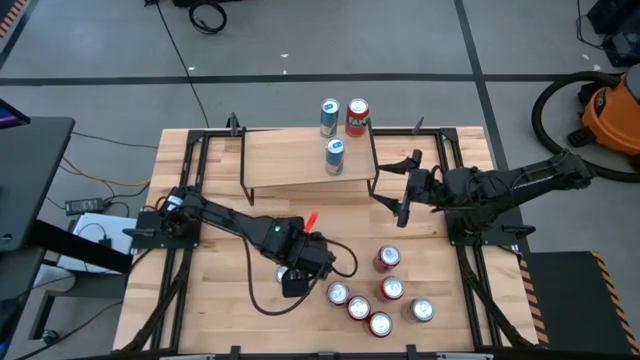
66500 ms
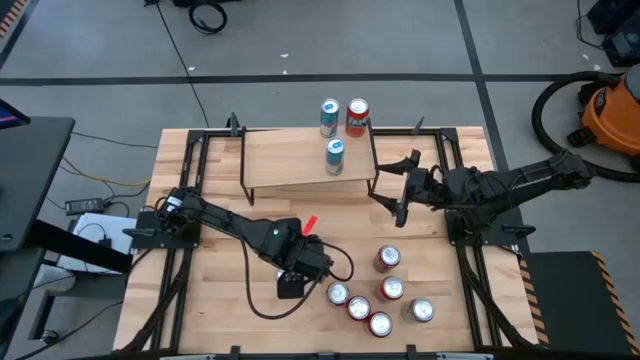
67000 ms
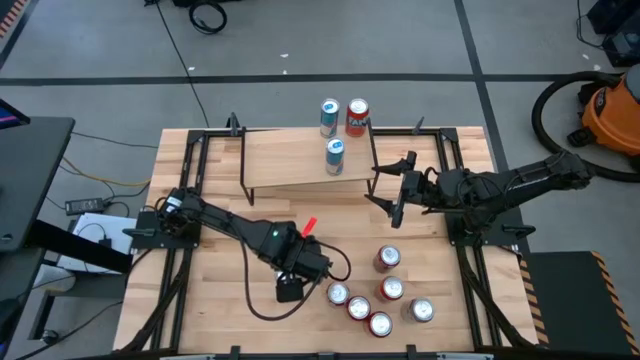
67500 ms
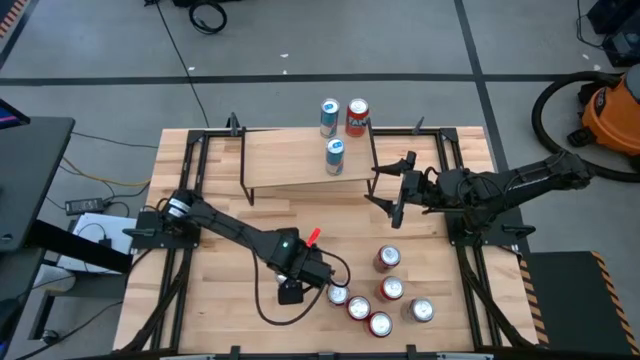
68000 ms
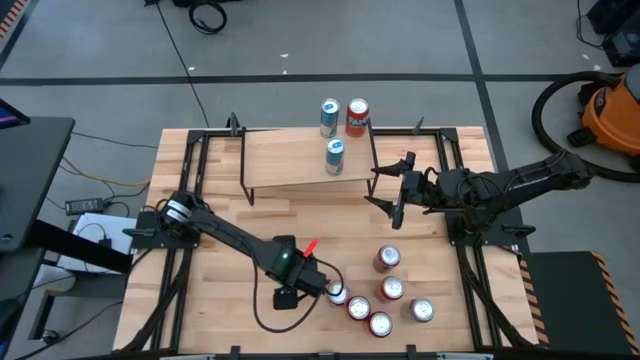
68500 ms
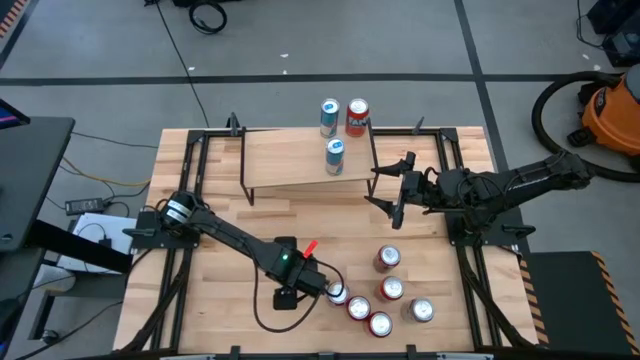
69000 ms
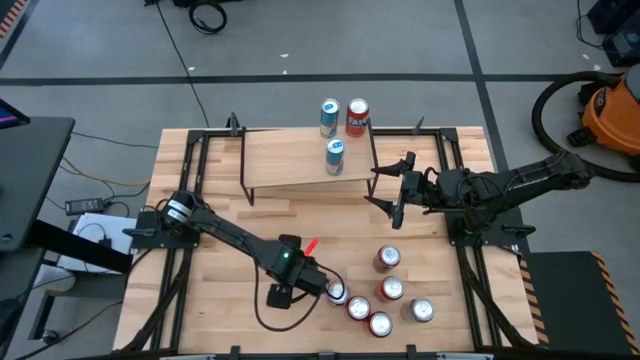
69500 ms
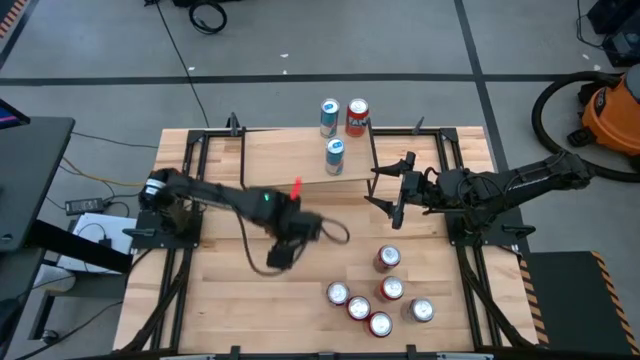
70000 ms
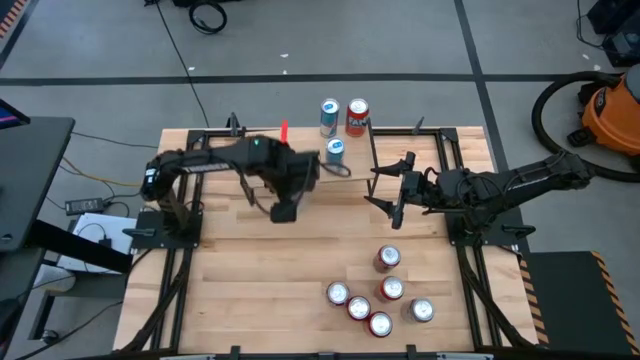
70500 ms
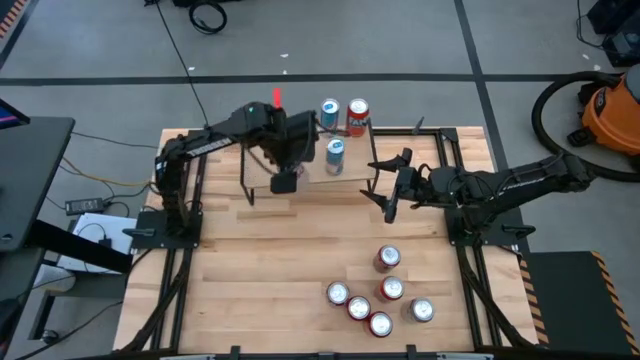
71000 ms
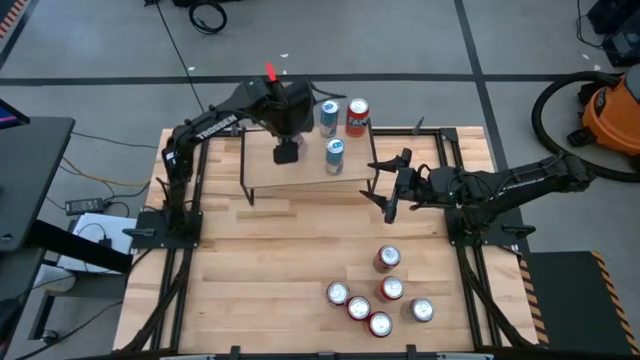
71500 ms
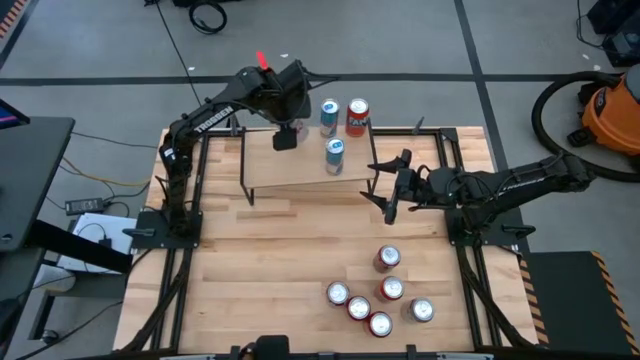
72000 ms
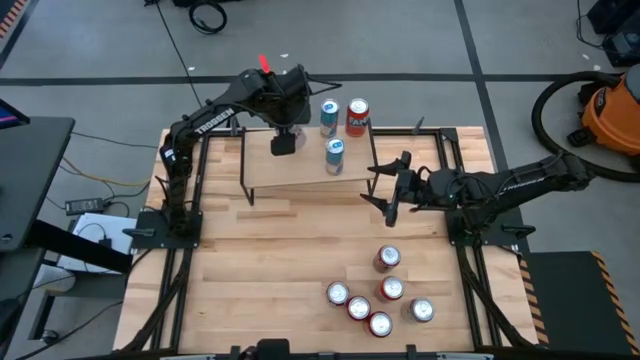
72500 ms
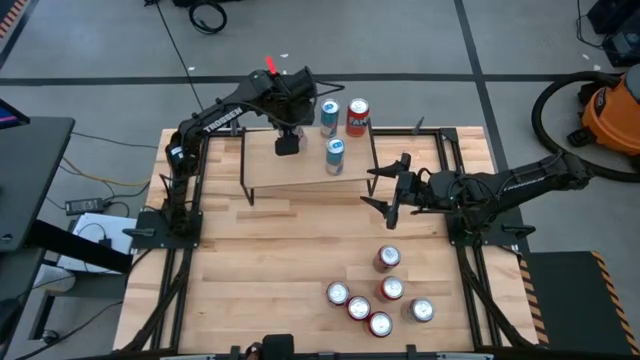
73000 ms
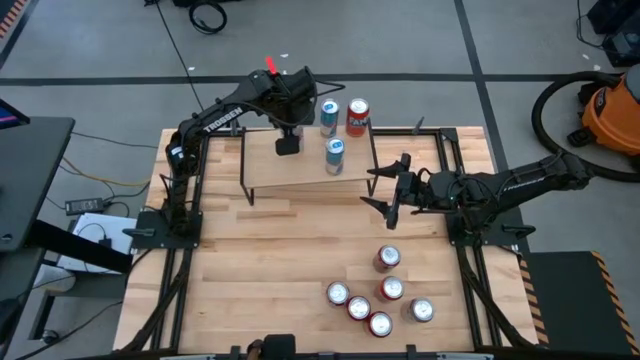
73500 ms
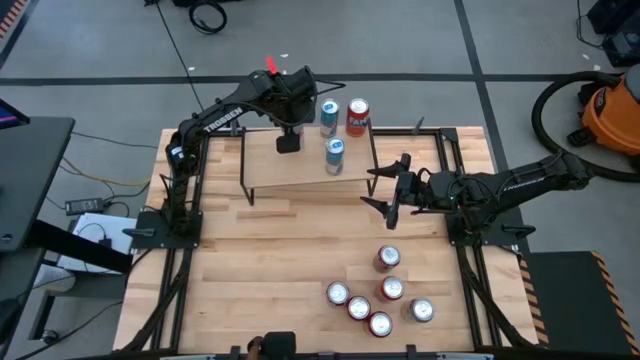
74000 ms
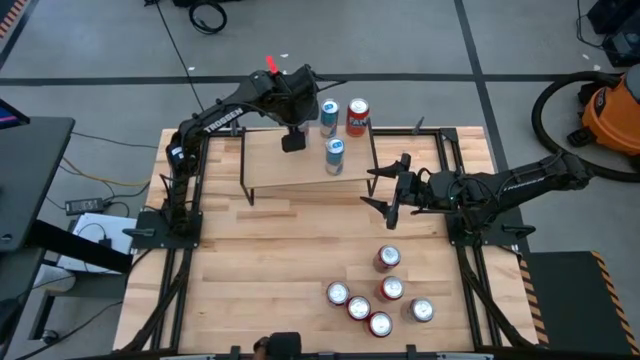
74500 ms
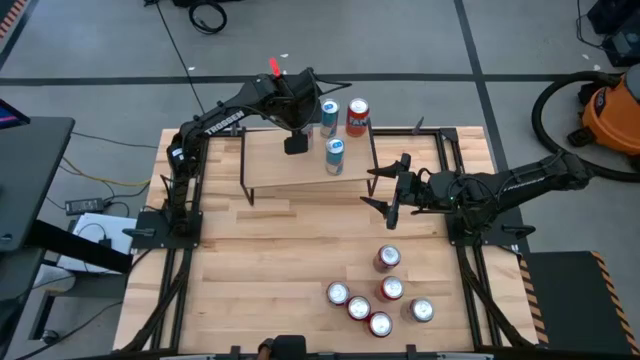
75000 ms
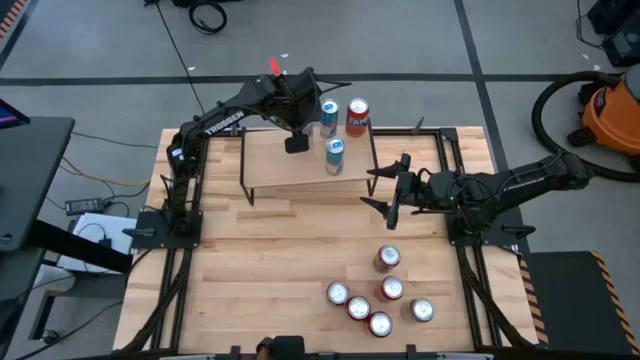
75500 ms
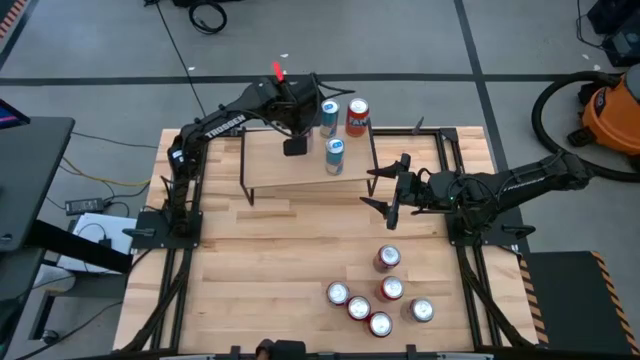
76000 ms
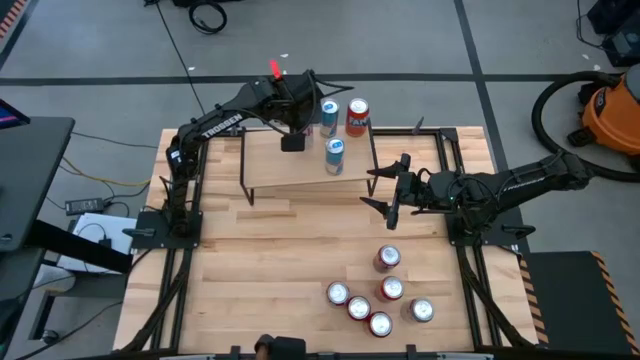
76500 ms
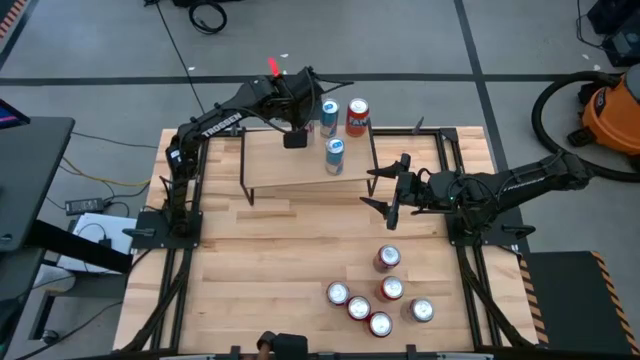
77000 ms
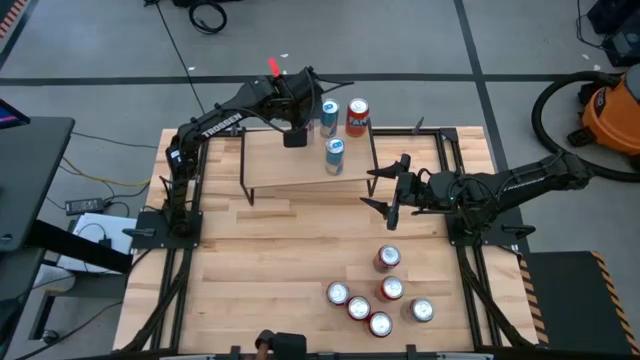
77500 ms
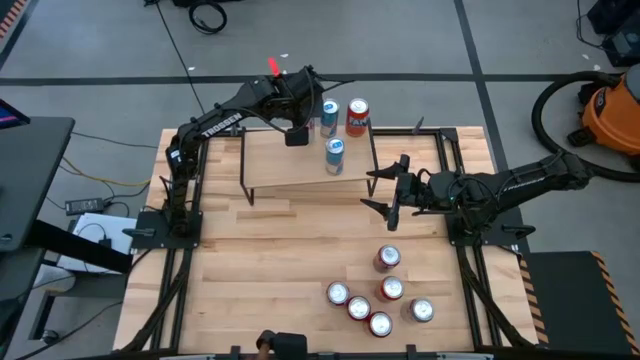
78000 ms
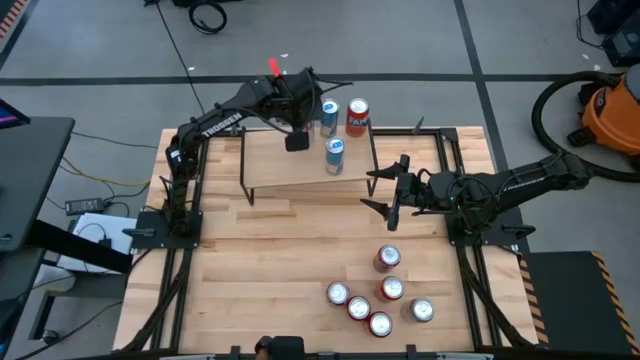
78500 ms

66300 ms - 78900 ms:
Task: Place canned beverage on shelf
Put the left silver soda can on the shelf

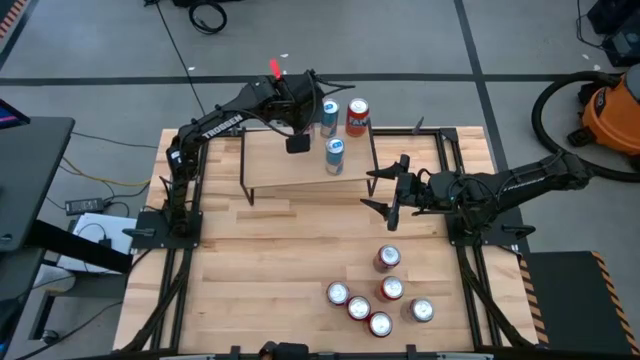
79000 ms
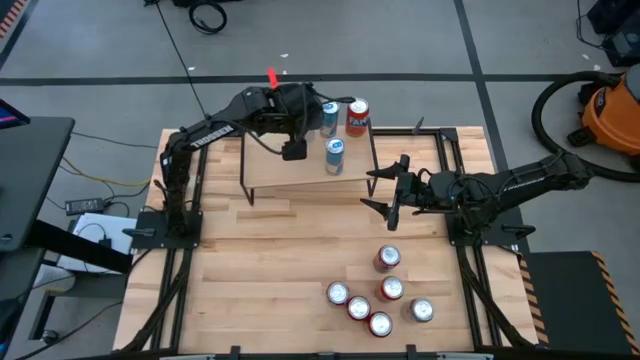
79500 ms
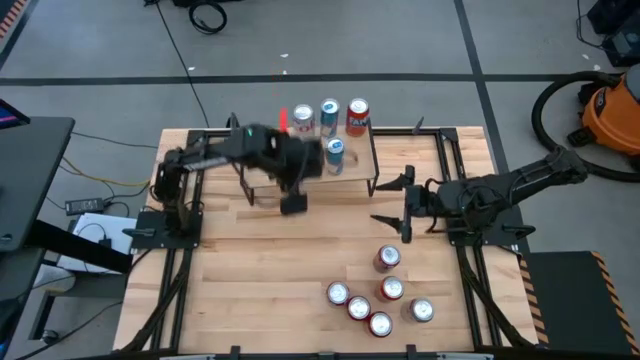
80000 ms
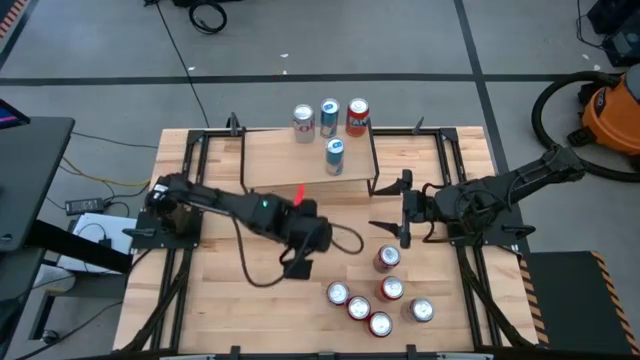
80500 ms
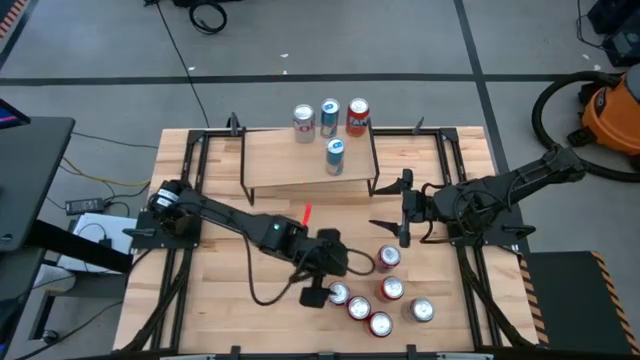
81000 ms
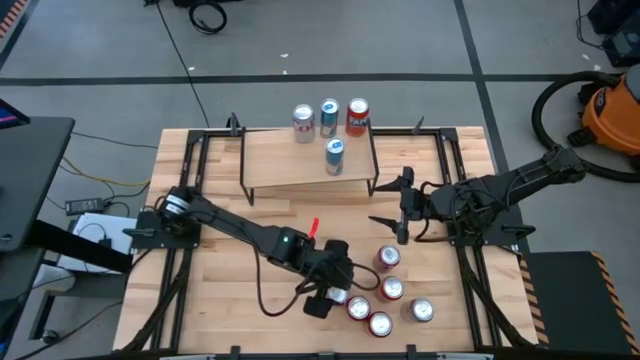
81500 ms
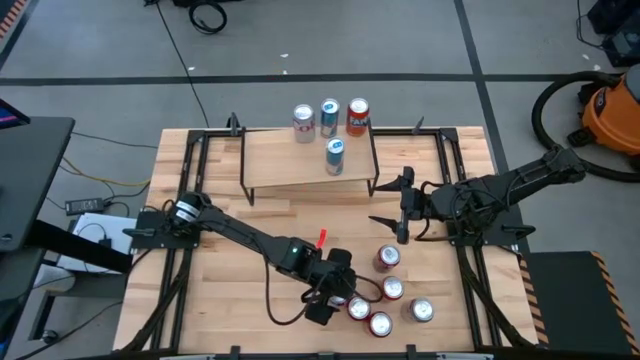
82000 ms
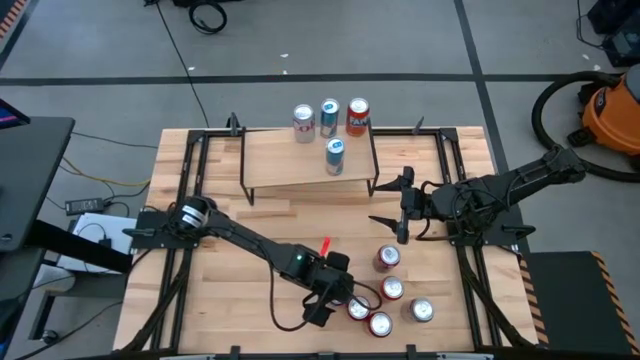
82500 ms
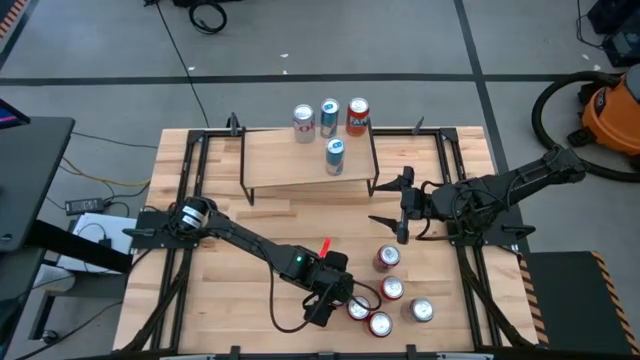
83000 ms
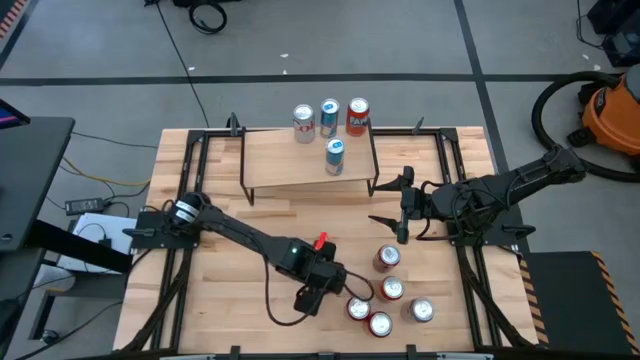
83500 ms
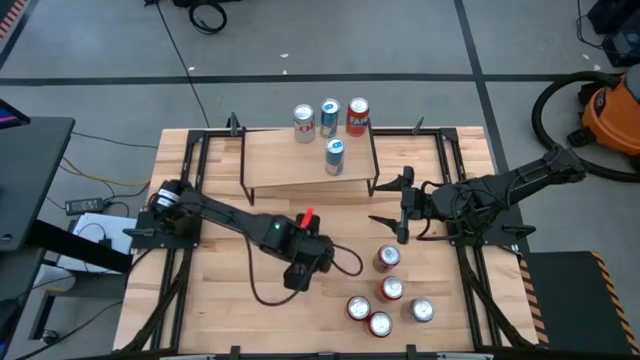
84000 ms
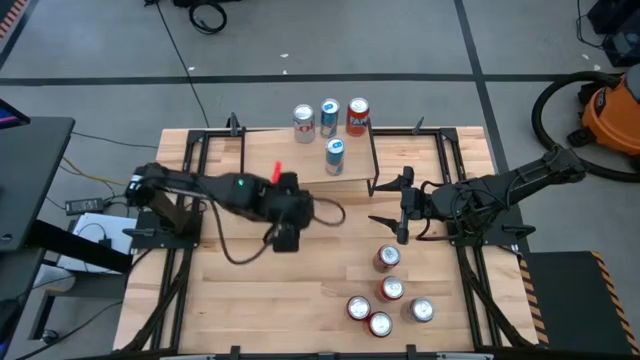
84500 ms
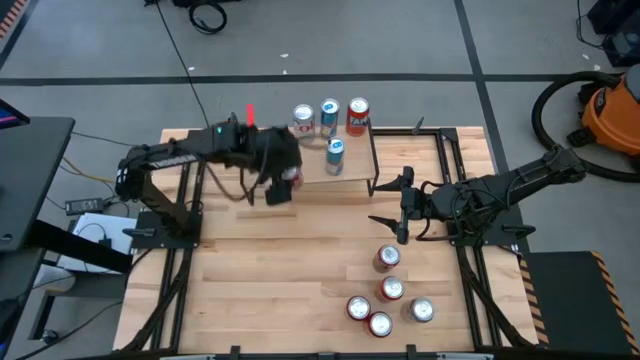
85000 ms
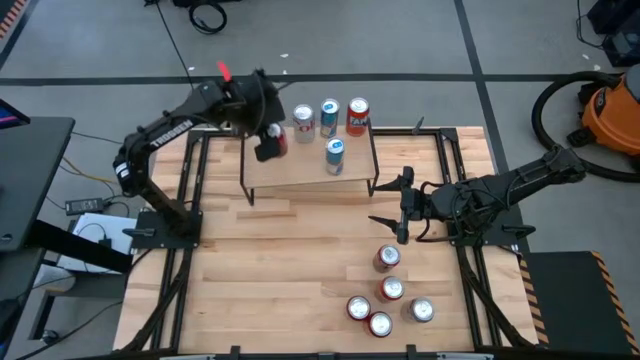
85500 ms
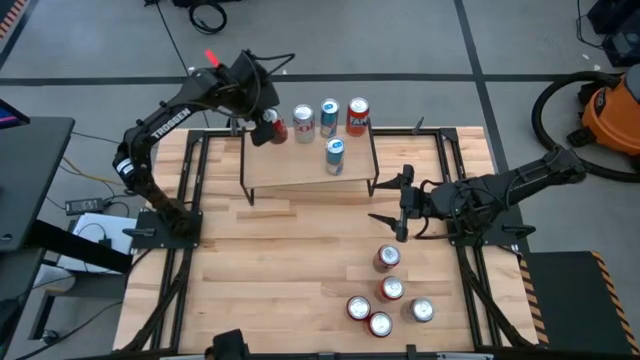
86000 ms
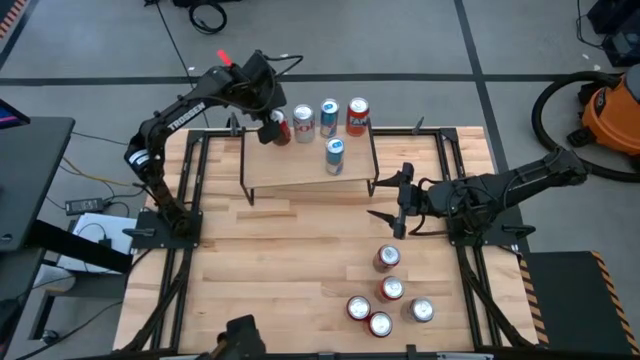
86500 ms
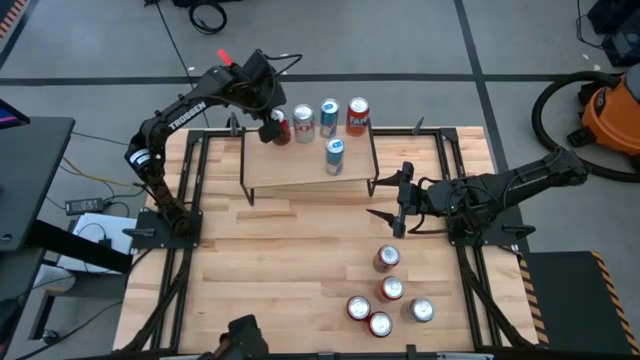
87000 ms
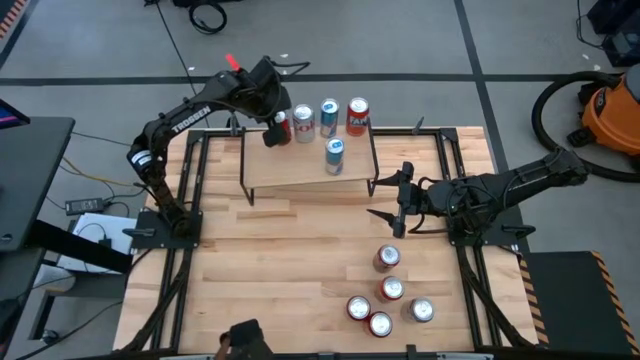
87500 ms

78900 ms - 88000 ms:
Put the bottom white soda can on the shelf
